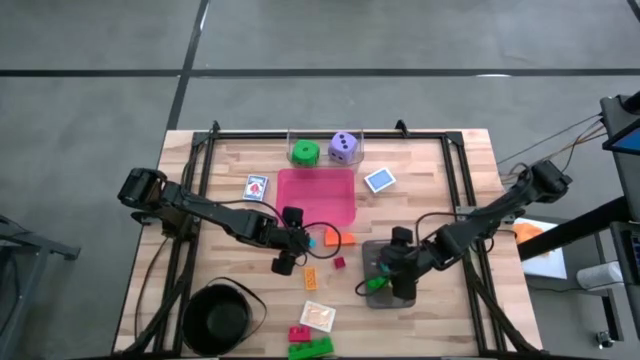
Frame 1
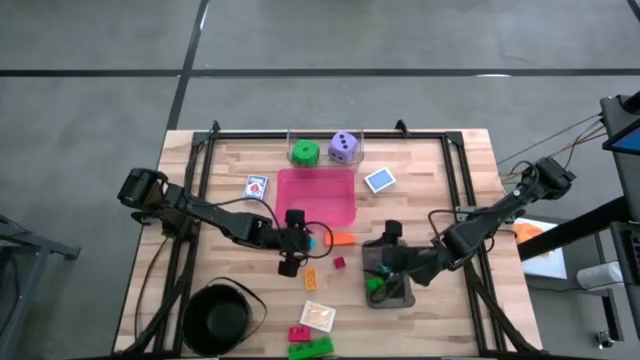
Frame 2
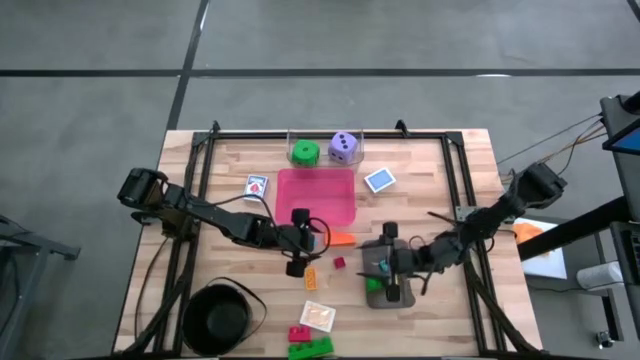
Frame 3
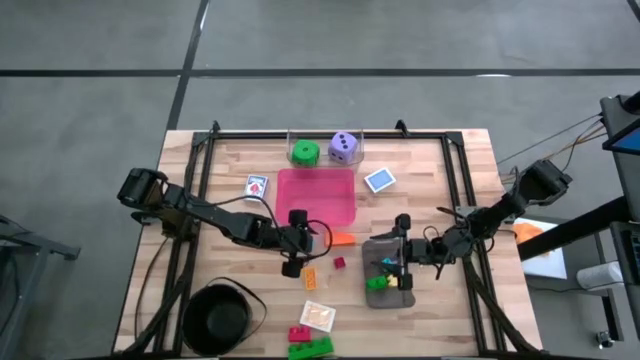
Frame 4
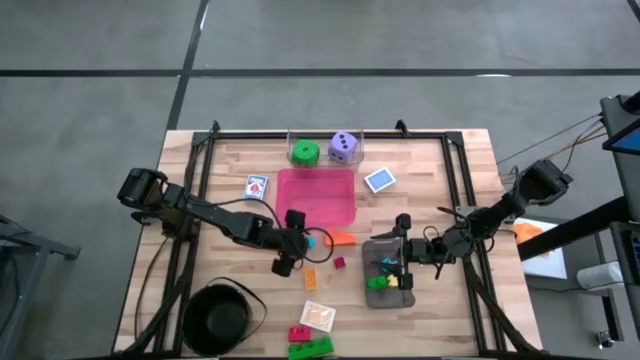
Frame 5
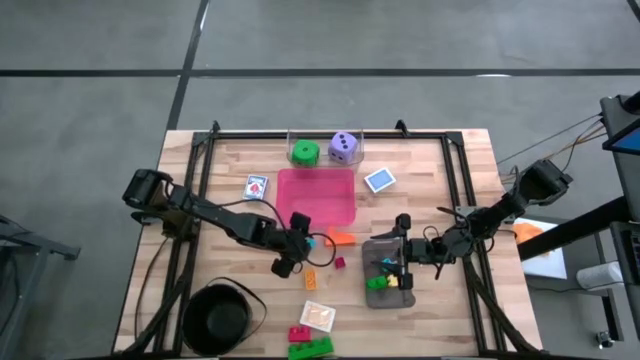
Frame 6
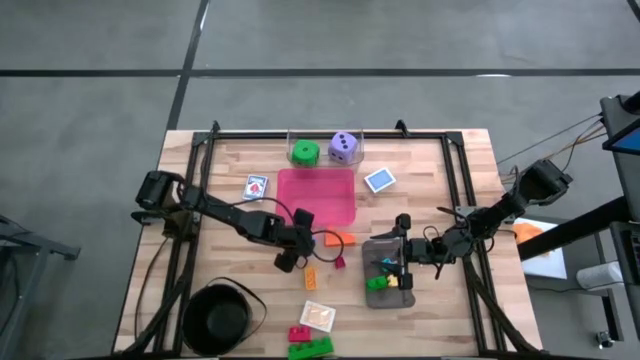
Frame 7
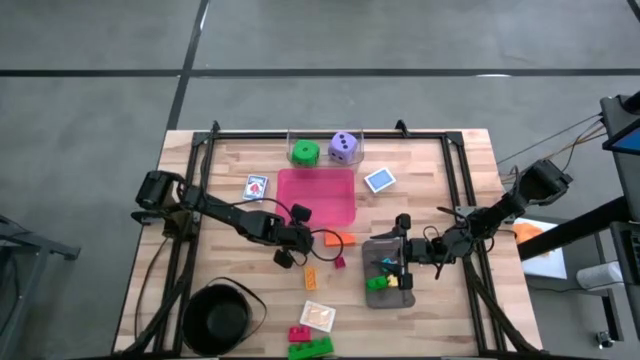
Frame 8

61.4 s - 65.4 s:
Task: Pick & Place Toys
Put the small blue game piece into the black bin

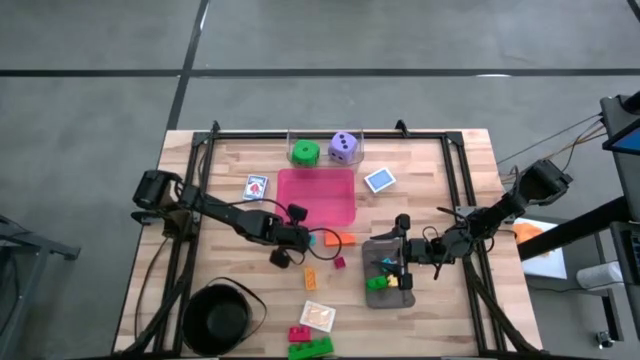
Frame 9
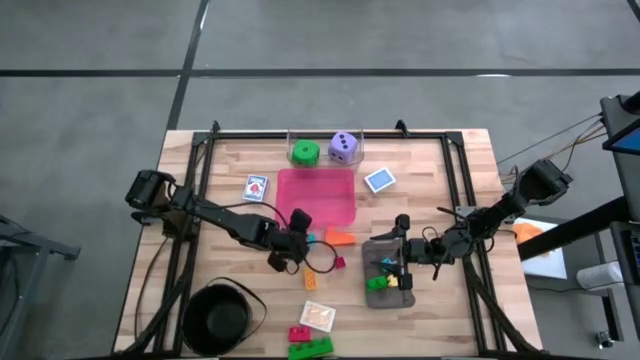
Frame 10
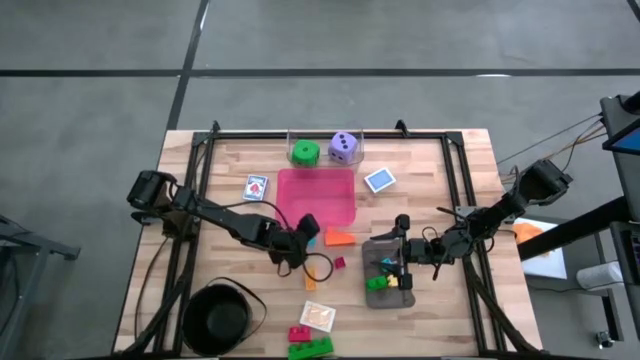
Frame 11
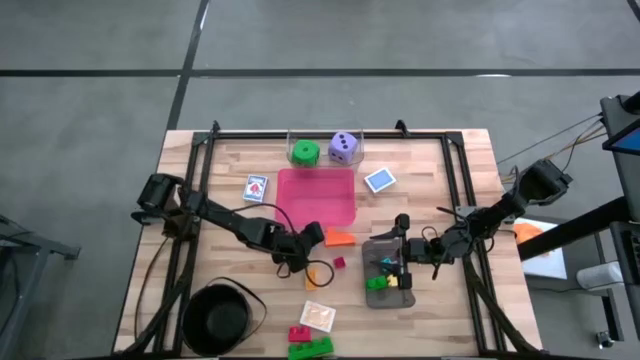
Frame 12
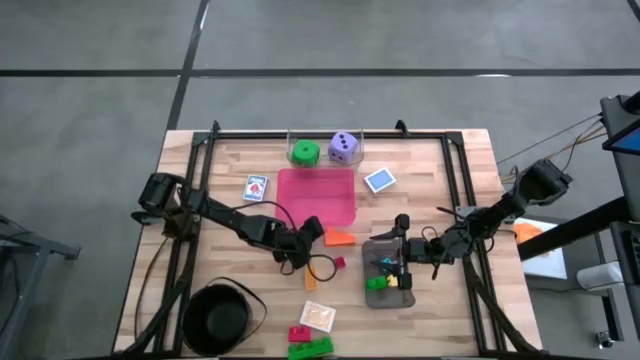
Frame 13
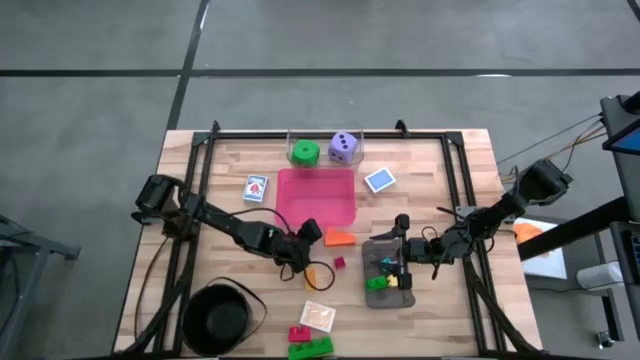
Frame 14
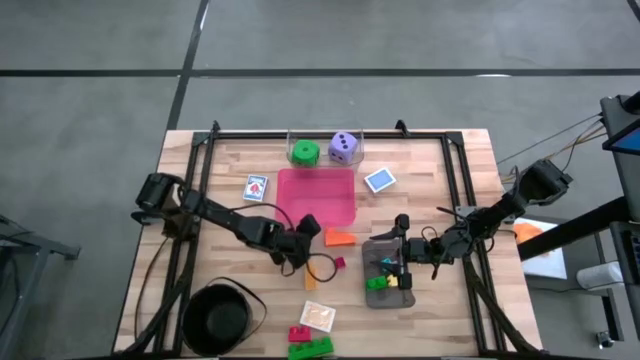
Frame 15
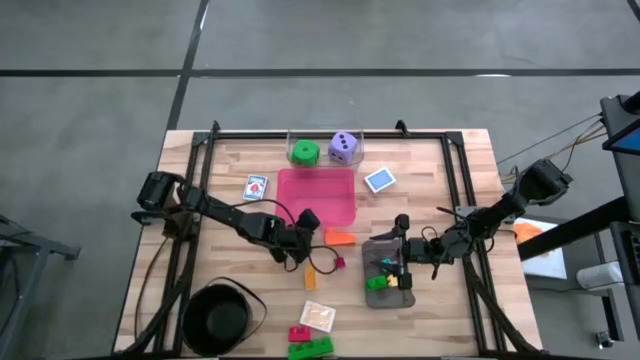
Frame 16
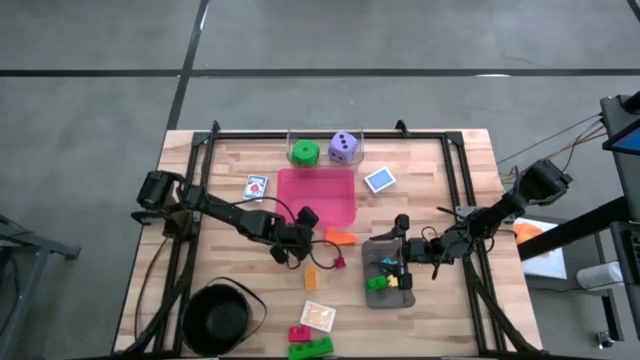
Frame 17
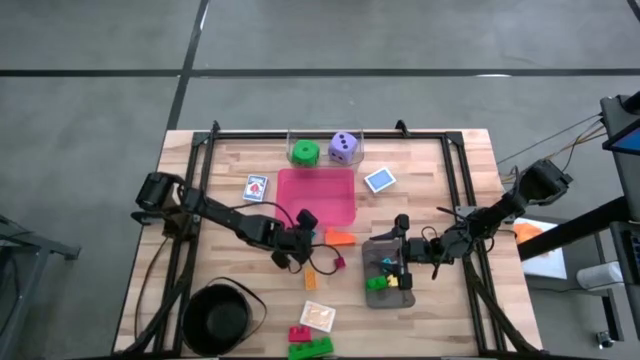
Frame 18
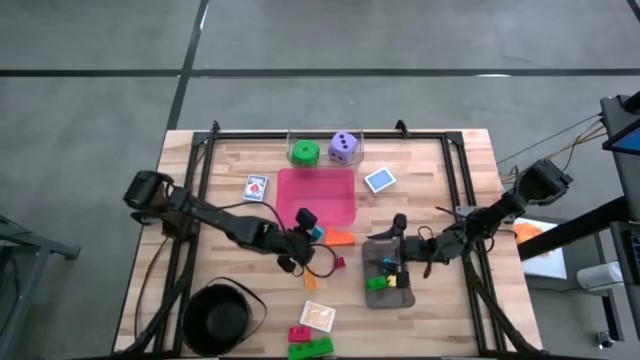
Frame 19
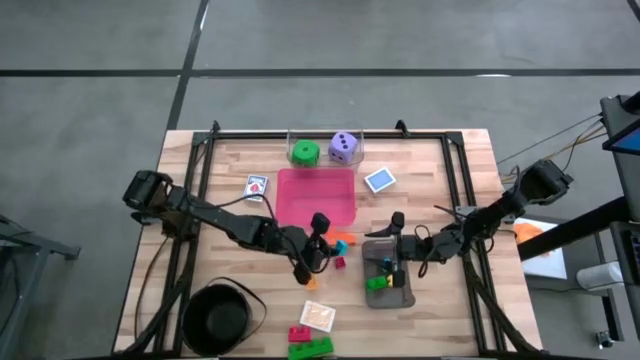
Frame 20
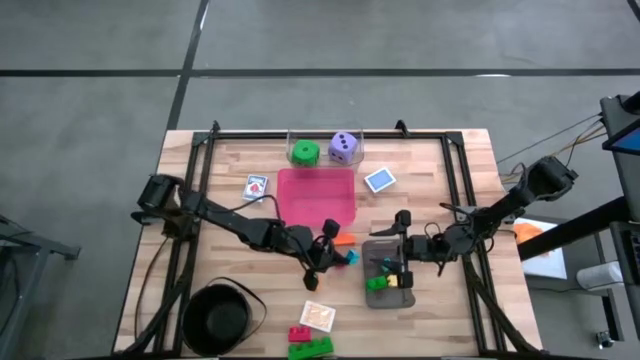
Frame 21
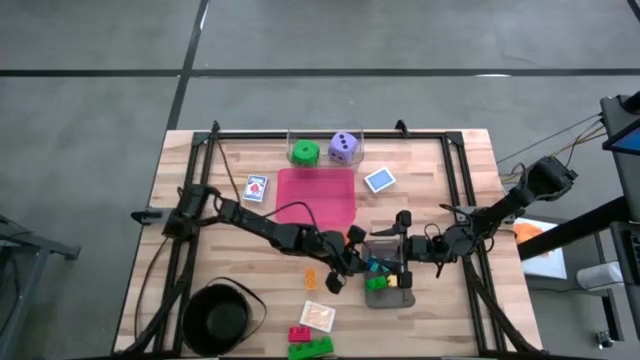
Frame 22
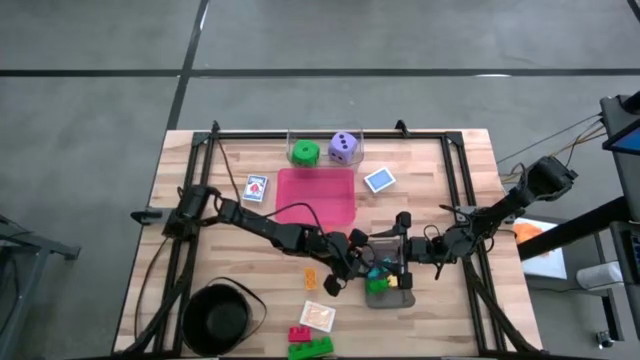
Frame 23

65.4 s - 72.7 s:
Put the small blue game piece into the black bin

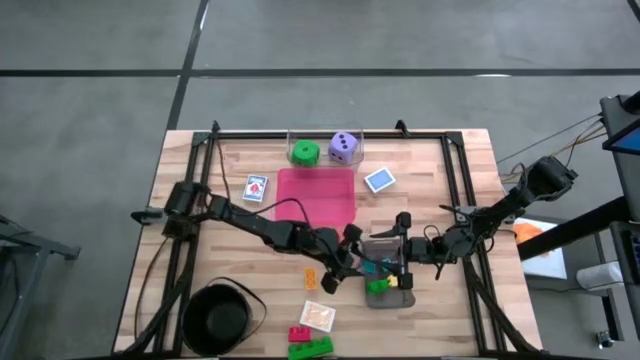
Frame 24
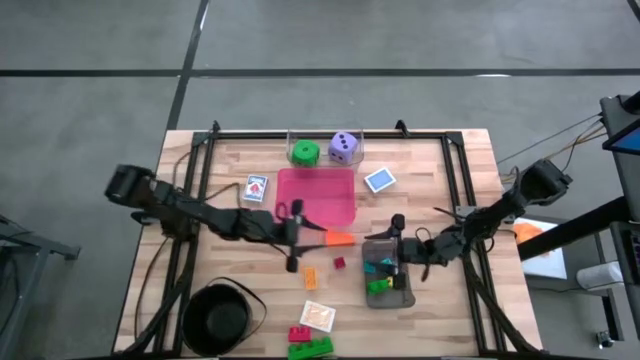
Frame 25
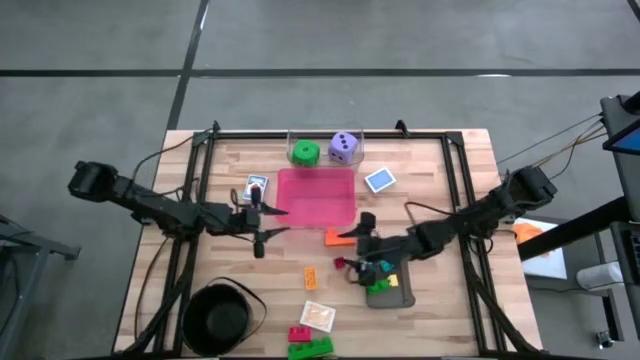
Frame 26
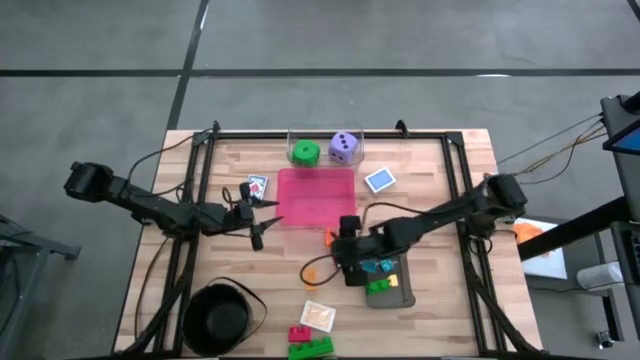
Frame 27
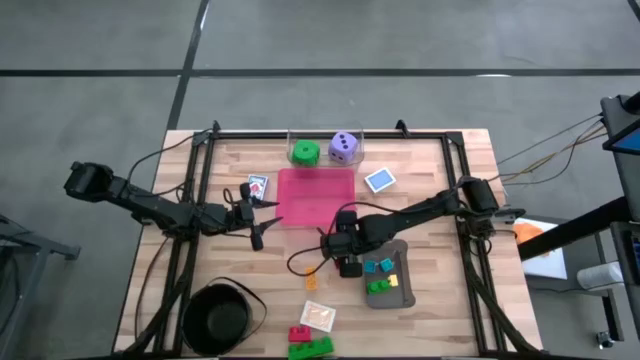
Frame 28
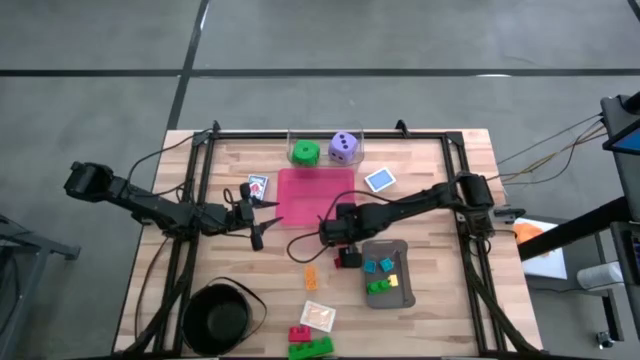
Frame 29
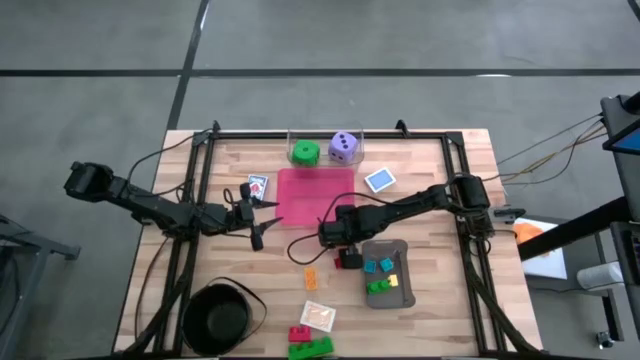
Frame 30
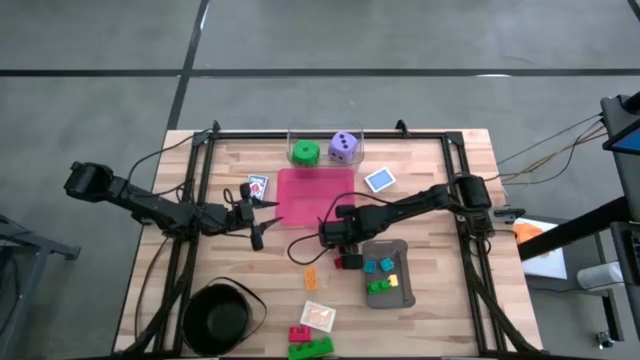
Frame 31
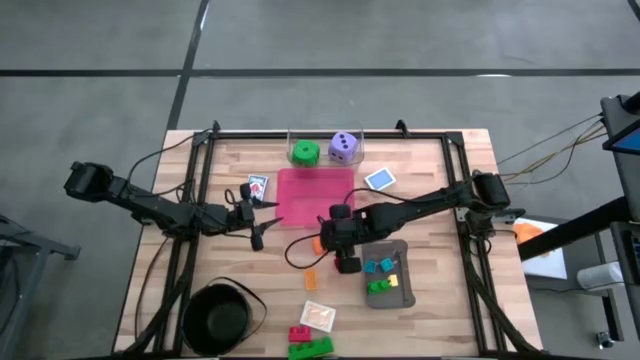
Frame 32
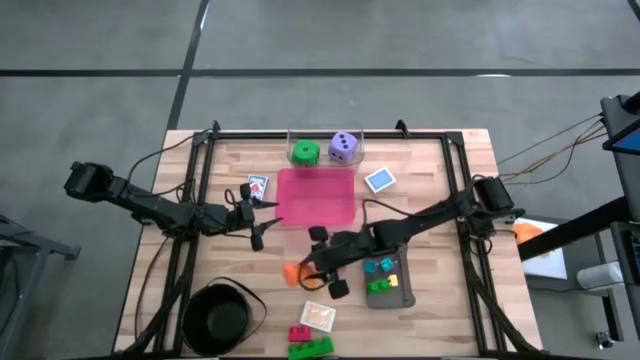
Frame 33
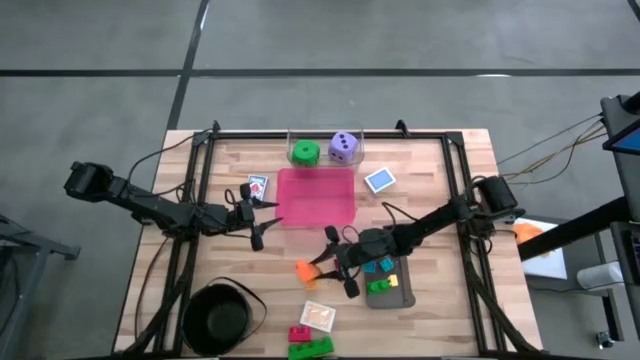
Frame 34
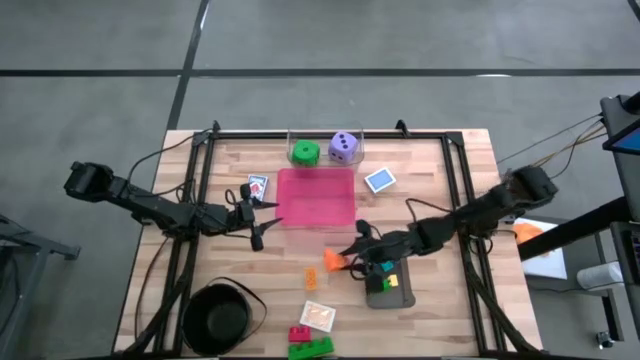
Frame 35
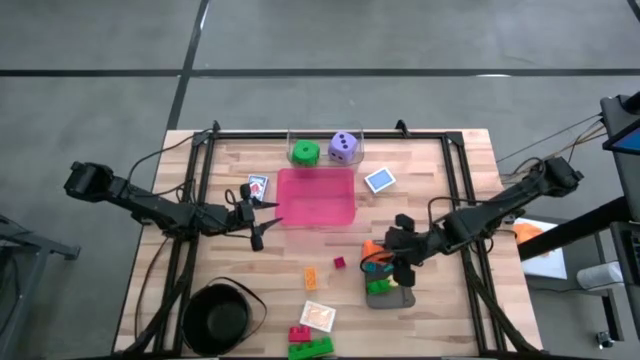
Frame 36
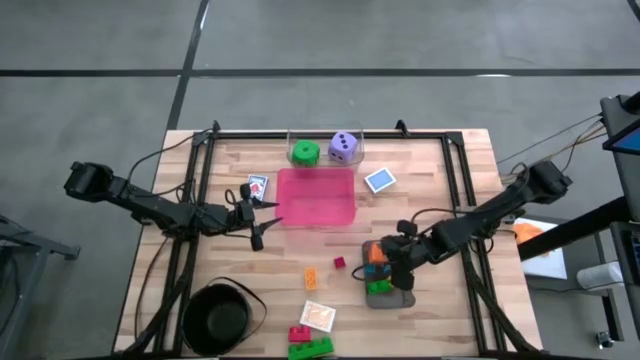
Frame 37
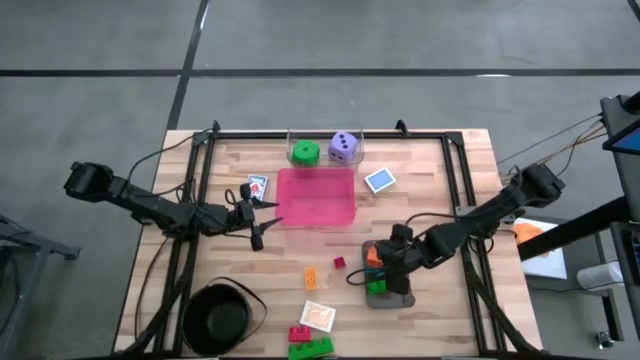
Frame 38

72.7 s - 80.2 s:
Put the big orange game piece into the black bin

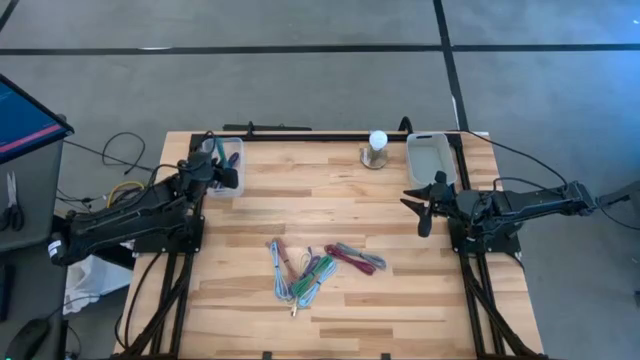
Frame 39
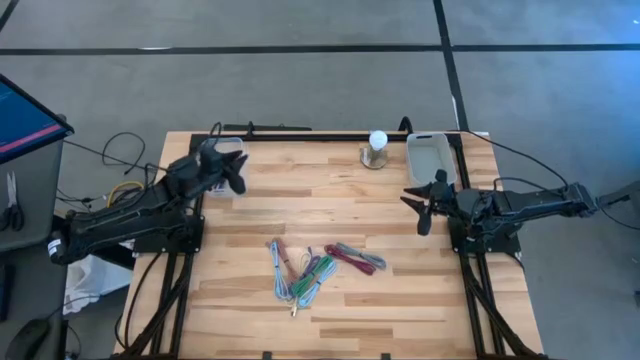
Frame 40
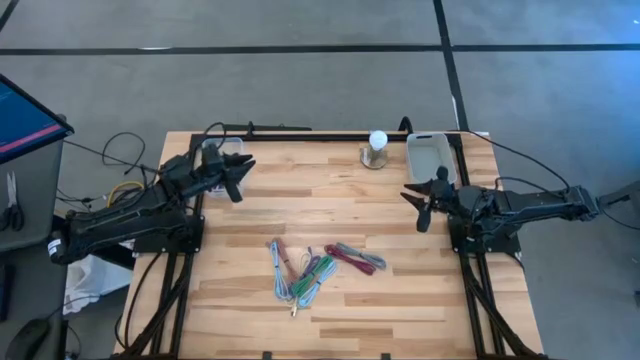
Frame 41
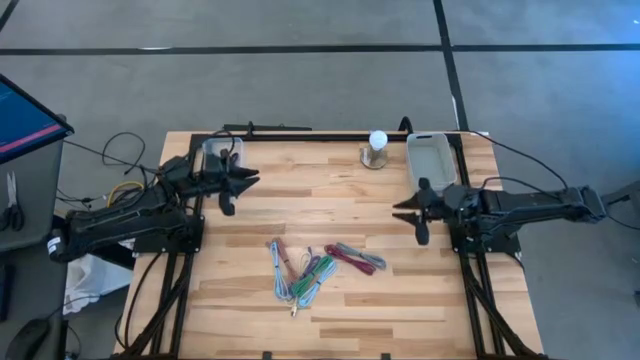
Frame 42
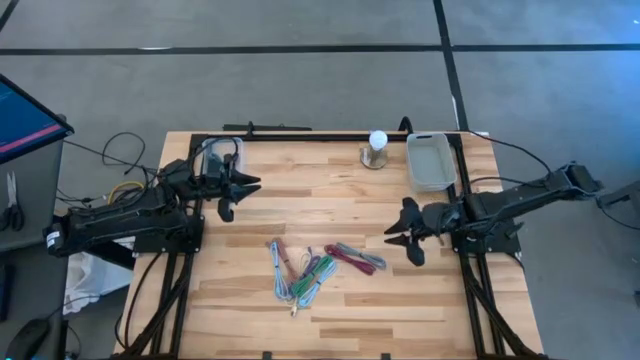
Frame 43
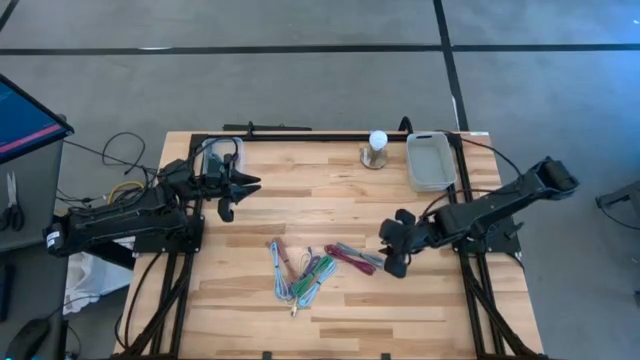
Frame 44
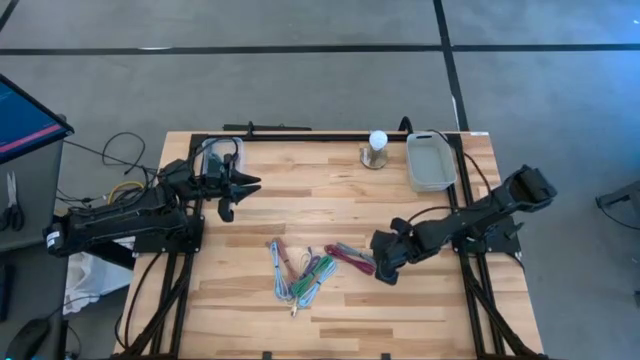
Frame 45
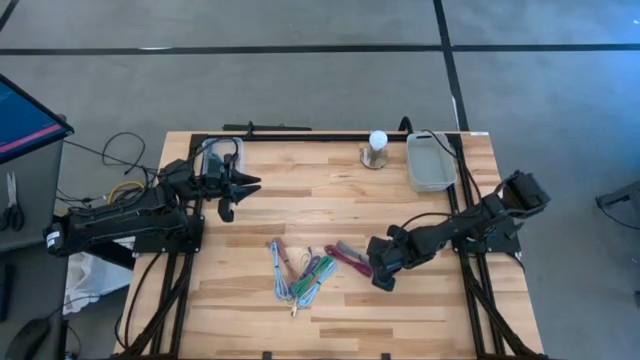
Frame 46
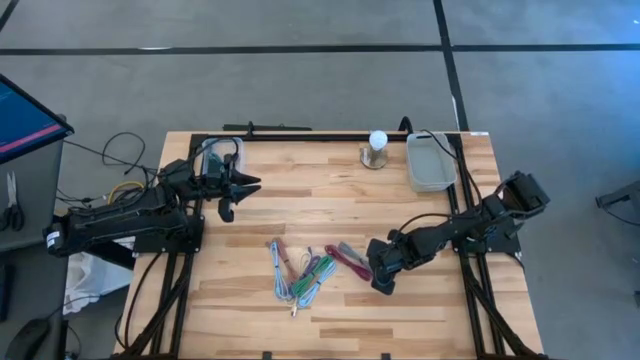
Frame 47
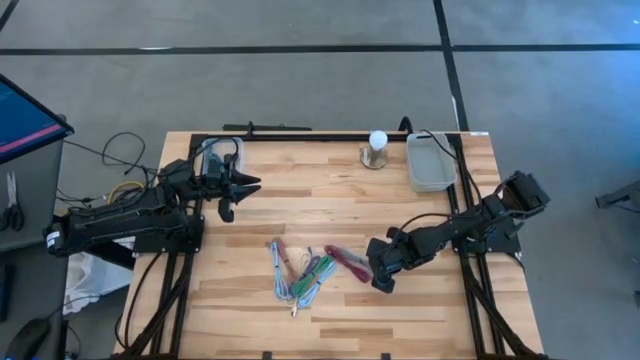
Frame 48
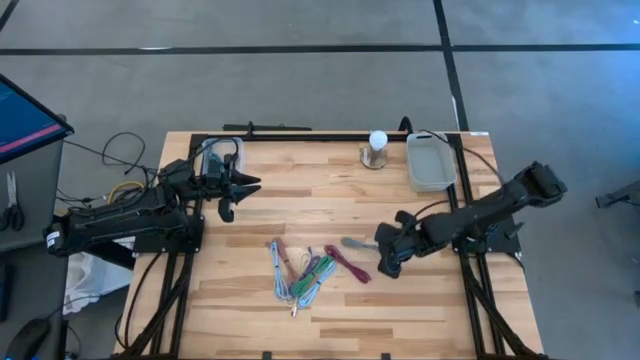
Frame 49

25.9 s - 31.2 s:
Task: Pick & Place USB Port
Put the white and black charger cable into the transparent bin
